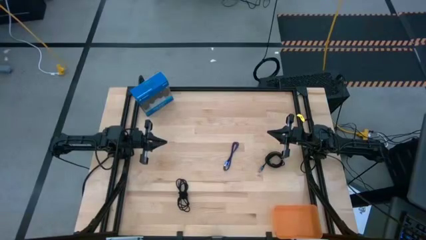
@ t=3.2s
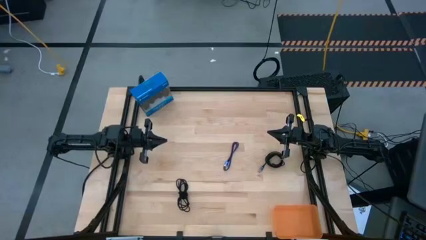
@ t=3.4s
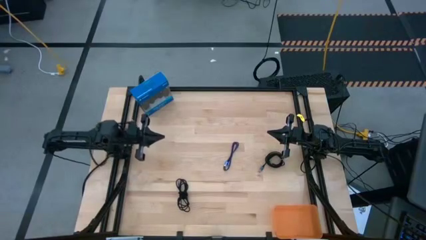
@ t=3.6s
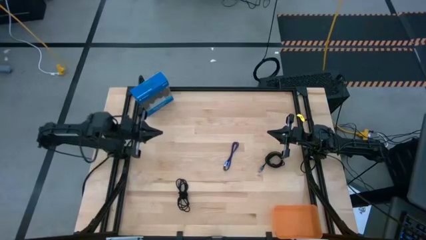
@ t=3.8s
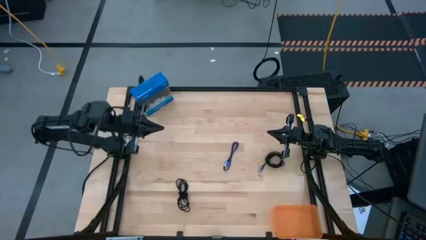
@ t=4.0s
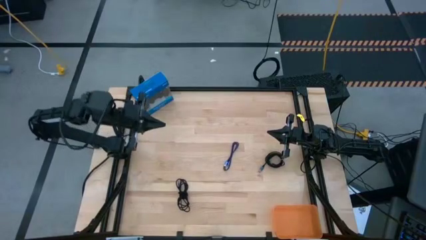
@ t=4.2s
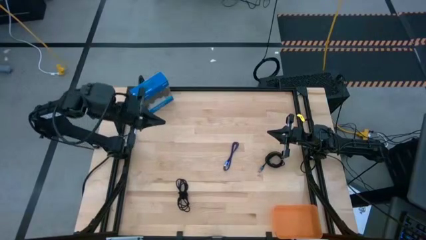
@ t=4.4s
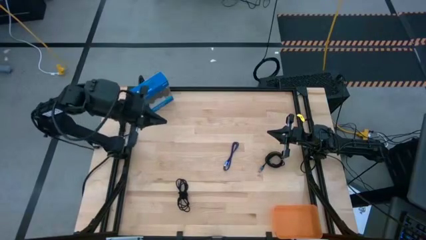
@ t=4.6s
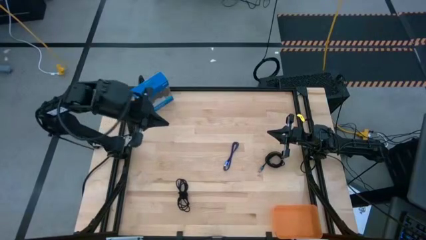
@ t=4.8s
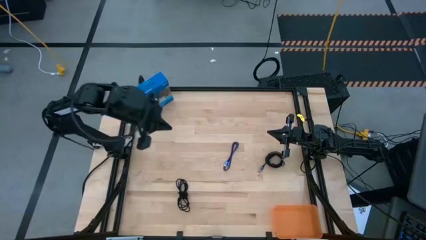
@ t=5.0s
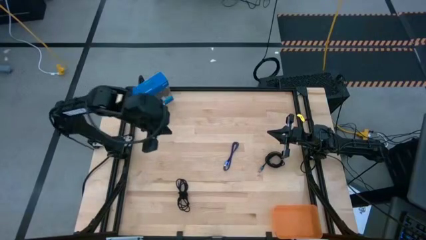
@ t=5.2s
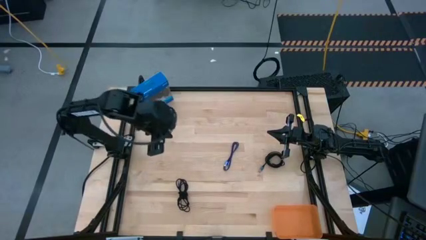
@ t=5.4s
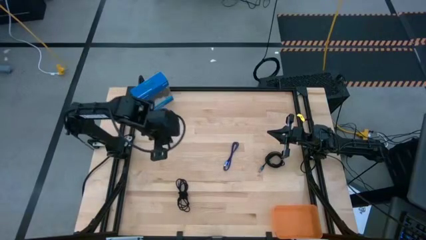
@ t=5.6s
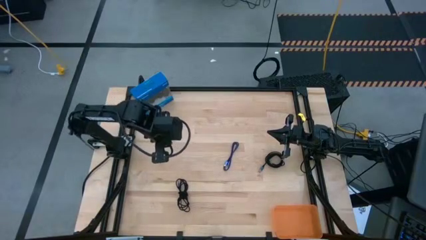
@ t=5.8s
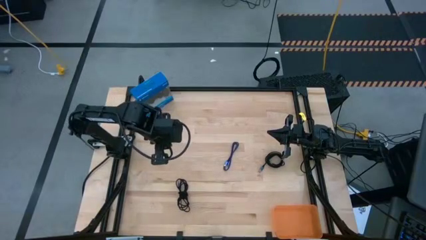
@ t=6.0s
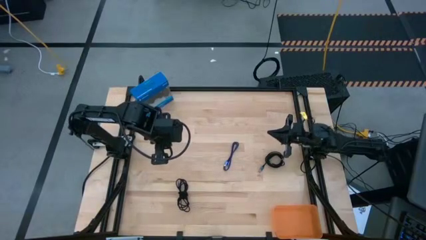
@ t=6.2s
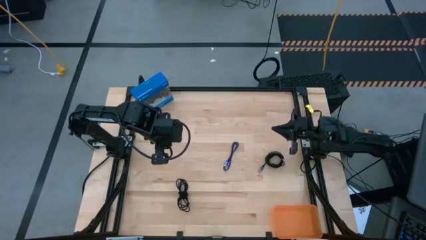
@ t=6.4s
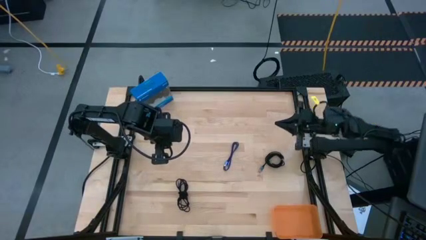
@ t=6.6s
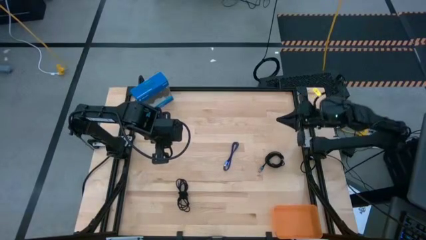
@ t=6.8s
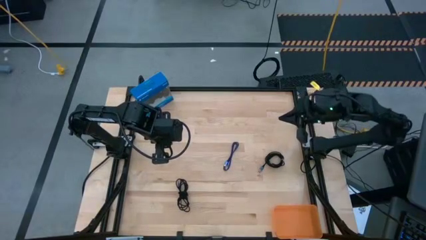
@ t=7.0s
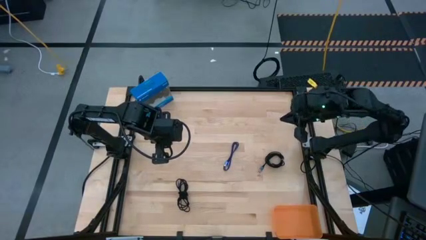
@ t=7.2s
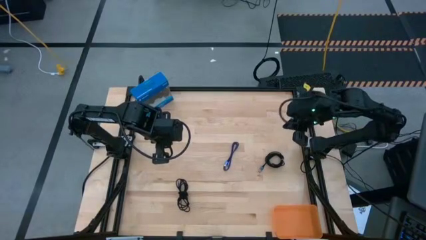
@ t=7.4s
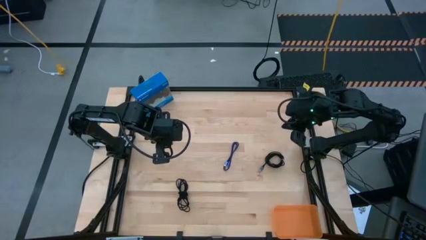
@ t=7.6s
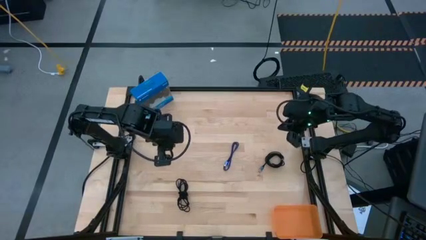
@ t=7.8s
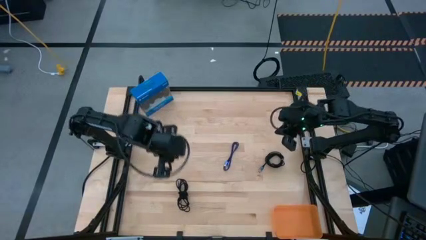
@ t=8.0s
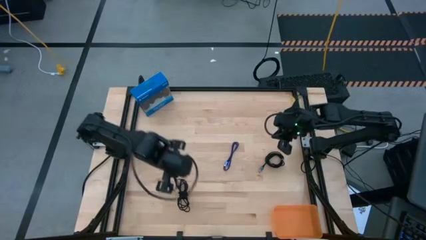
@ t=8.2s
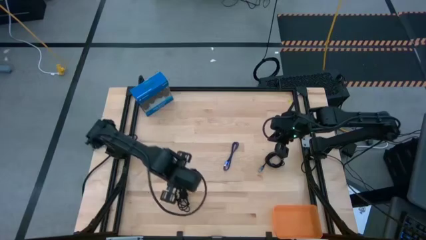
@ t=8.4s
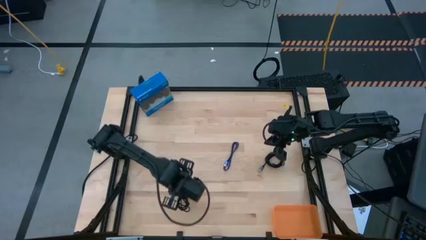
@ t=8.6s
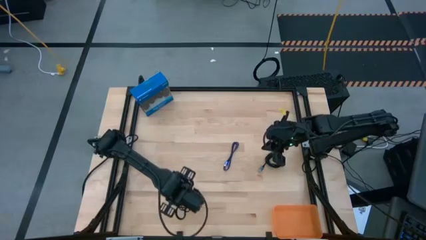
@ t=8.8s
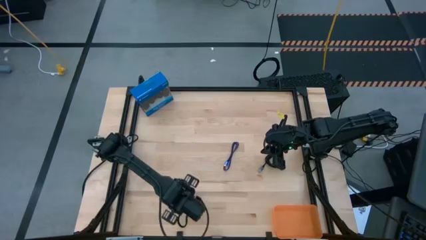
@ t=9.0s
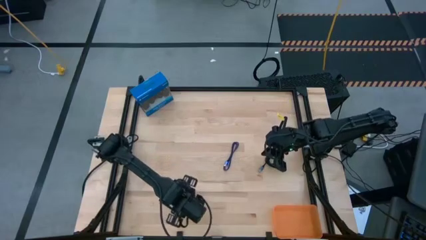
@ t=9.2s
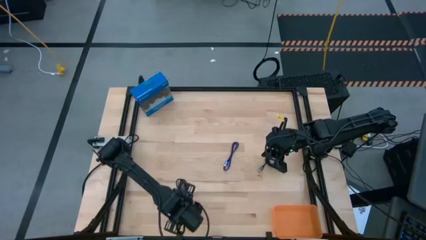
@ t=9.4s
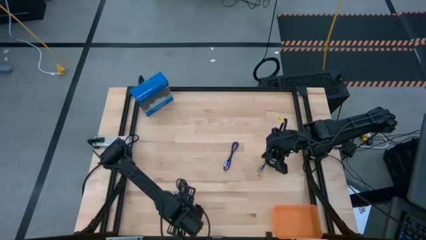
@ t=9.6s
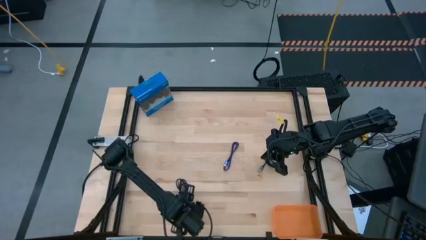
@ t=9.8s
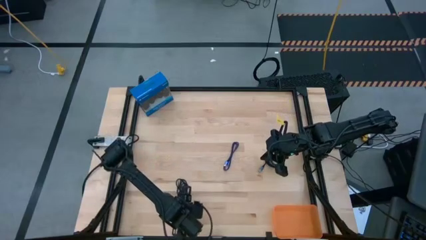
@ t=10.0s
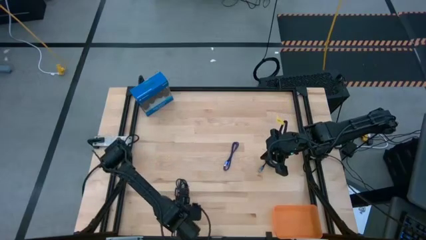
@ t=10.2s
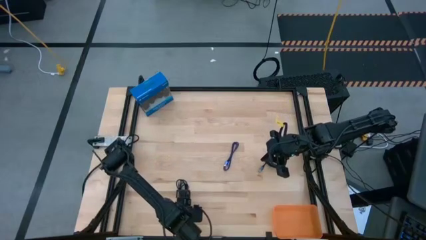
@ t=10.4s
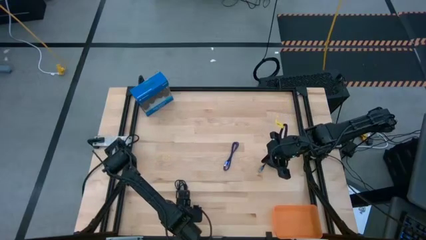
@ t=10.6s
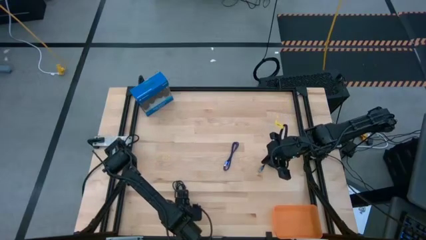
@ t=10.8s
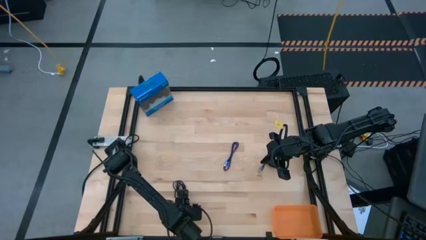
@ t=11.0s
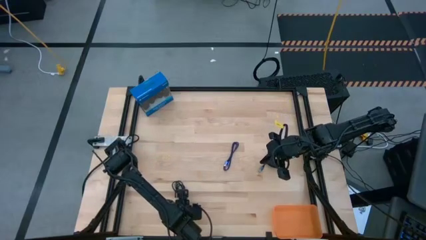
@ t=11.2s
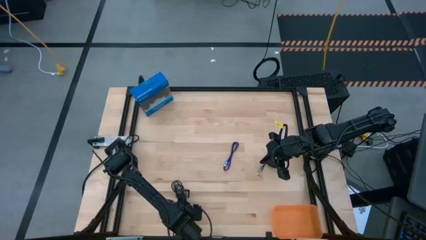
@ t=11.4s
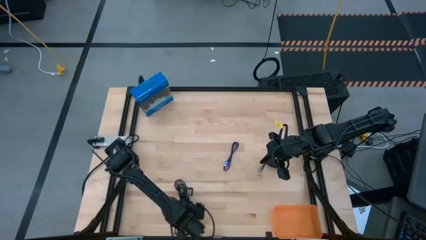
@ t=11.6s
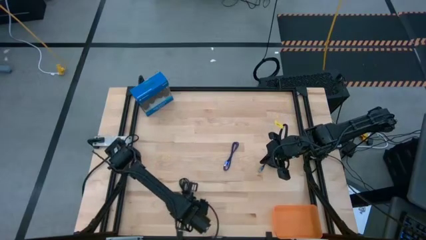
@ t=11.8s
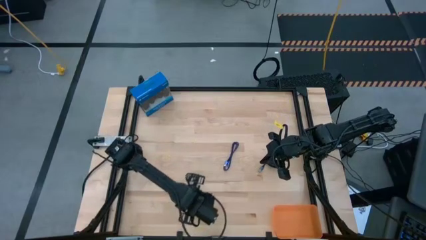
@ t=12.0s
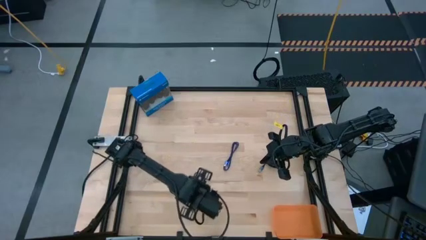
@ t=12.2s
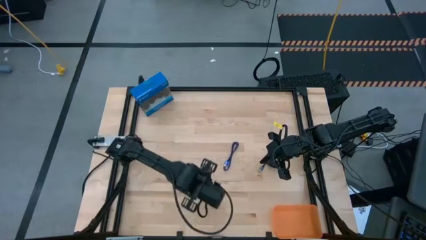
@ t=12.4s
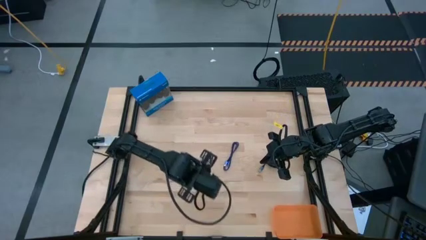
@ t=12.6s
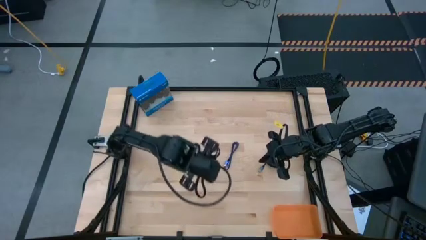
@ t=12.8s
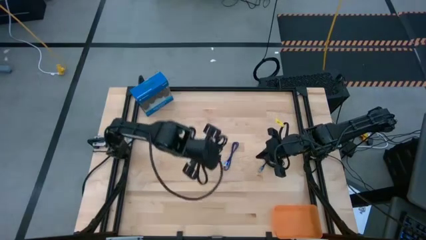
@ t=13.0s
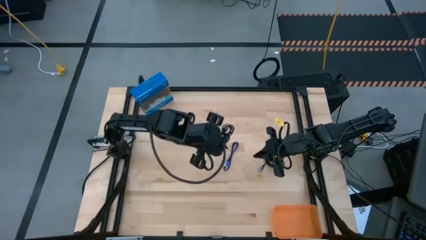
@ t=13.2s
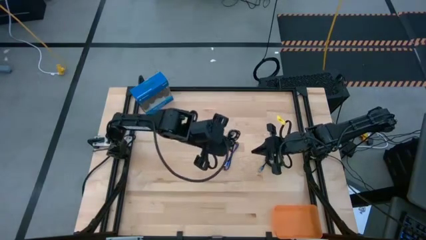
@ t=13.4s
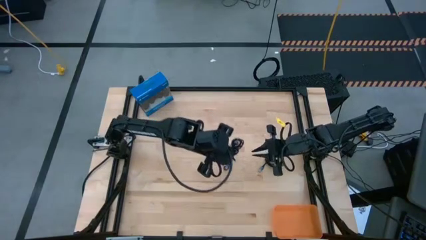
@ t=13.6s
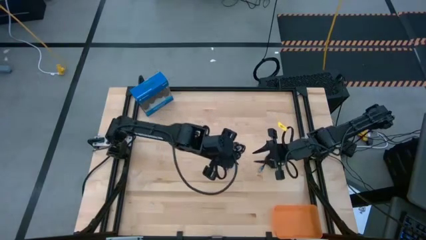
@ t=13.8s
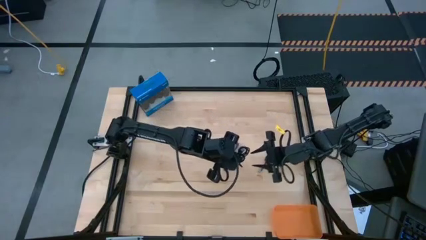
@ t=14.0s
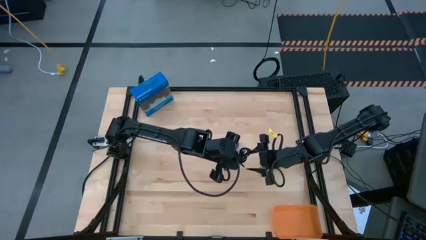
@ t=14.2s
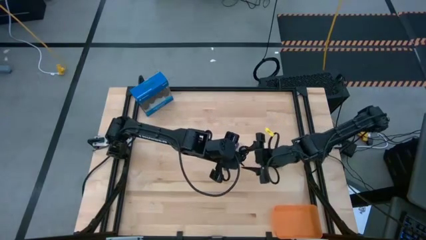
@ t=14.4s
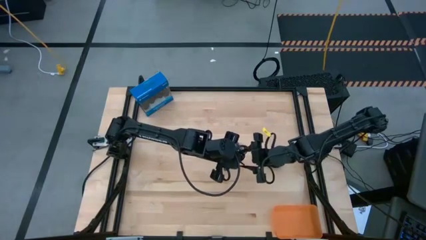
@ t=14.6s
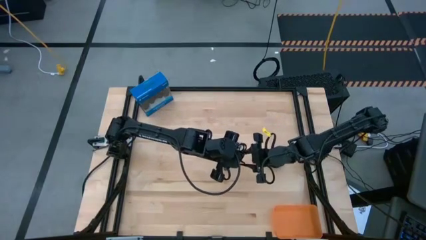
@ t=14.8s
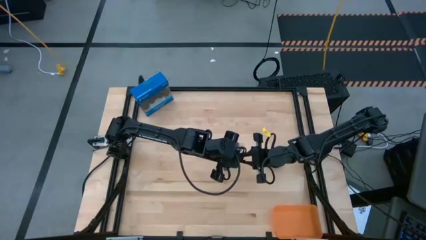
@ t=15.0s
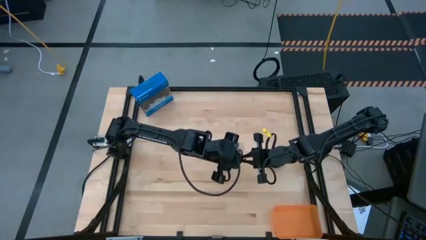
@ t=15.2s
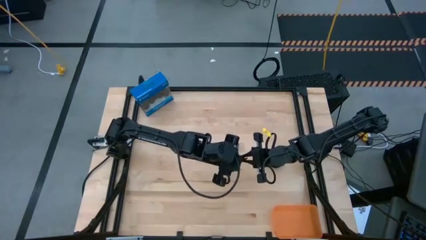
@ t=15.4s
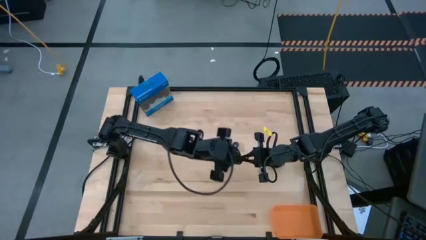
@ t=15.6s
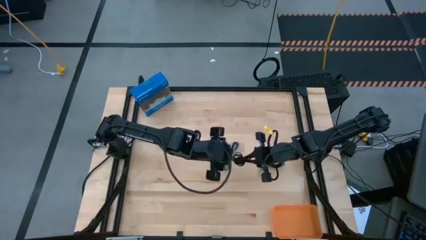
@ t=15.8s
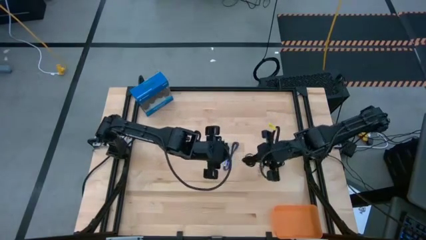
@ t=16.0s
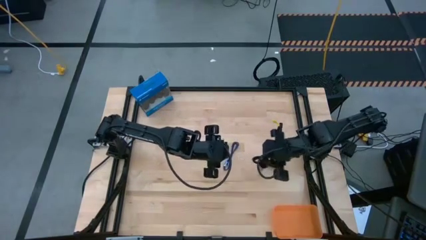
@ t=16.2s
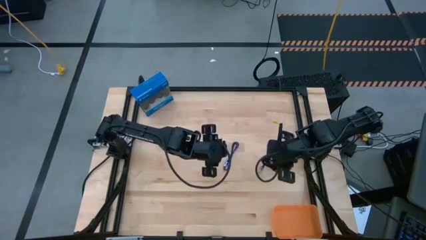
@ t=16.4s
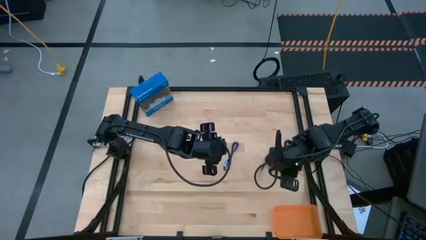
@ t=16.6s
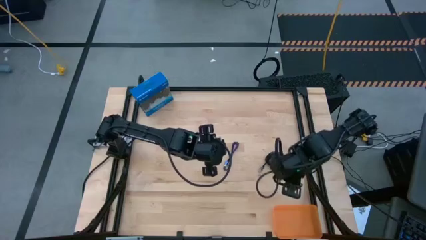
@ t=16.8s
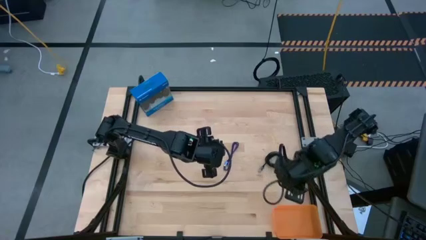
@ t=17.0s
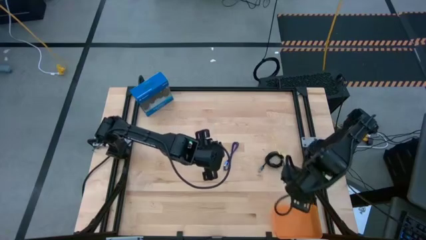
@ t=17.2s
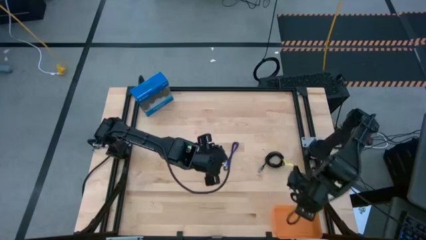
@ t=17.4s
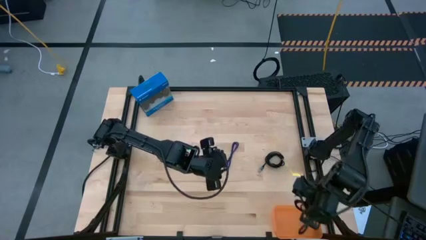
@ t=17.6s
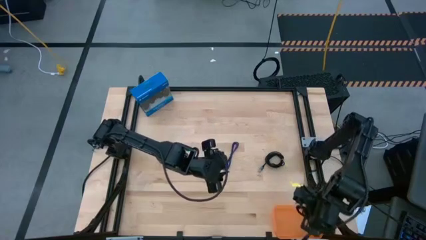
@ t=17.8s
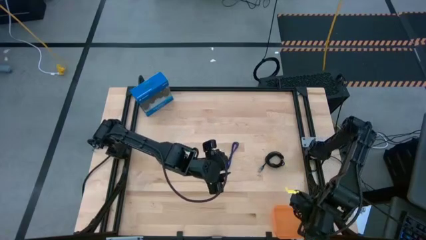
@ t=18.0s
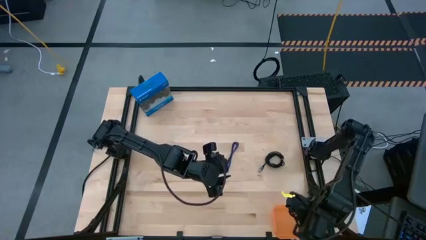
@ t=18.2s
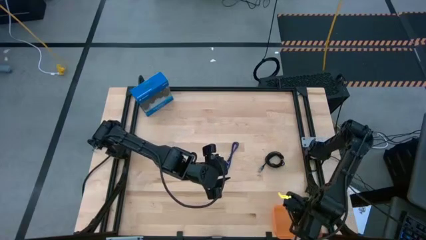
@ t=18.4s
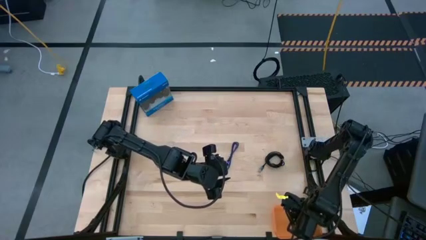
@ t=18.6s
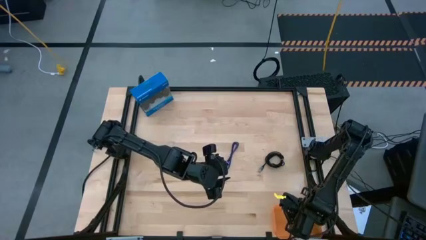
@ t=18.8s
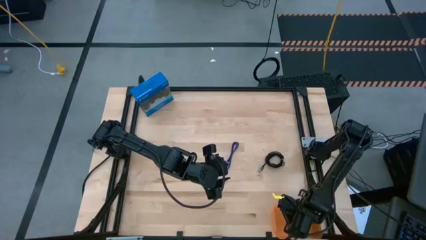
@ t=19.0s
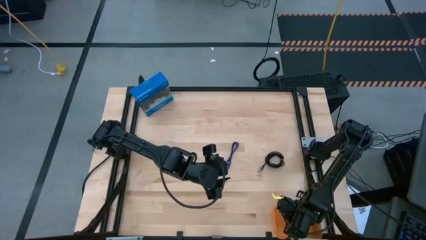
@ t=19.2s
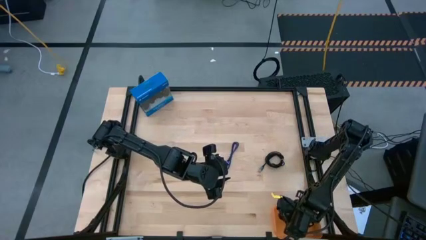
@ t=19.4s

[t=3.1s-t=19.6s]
Task: Pick and place USB-C Cables
Put the bottom black charger cable into the orange bin
